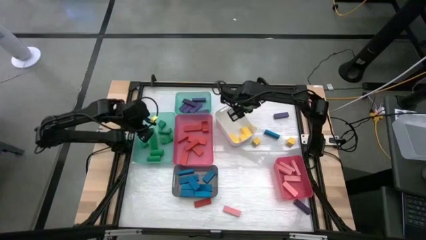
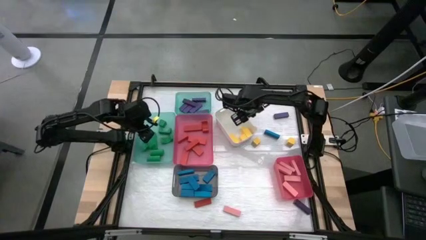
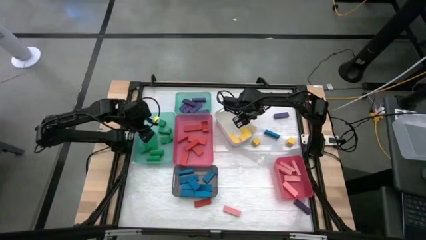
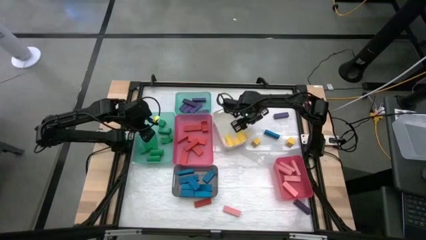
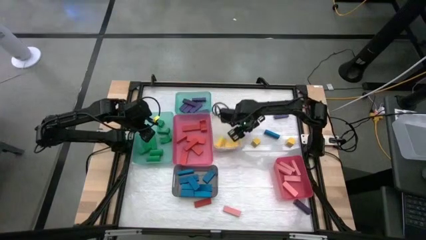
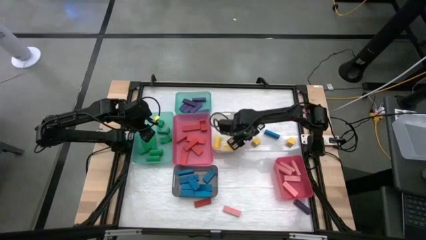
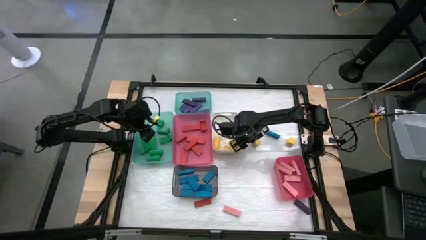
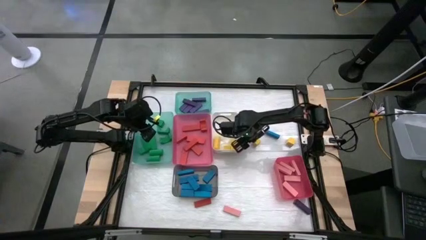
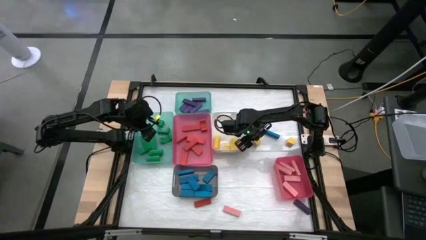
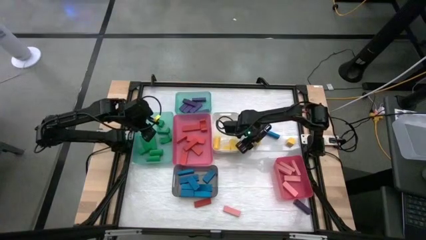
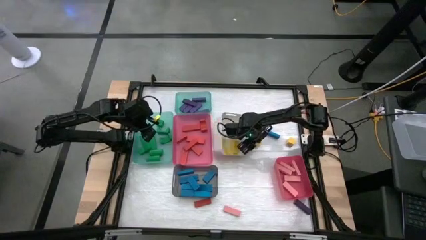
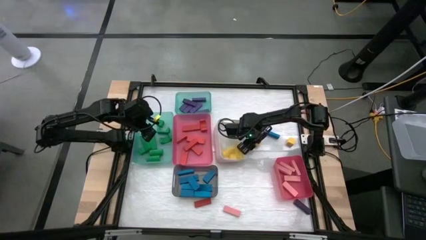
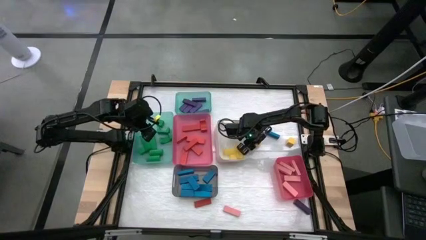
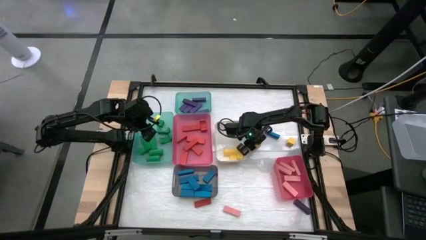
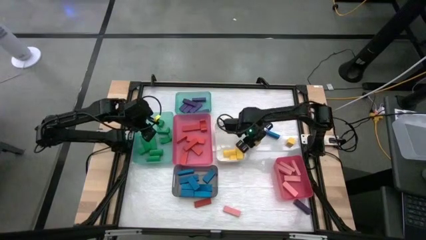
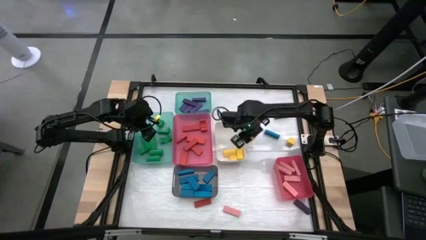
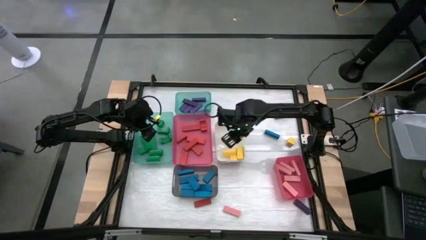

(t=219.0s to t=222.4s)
Task: Sort blocks
Put the yellow block into the white bin

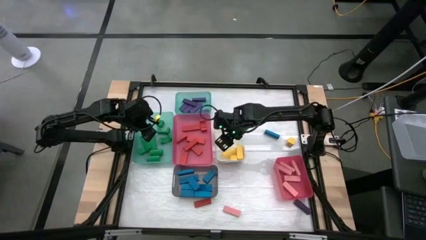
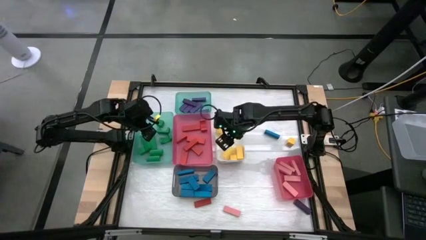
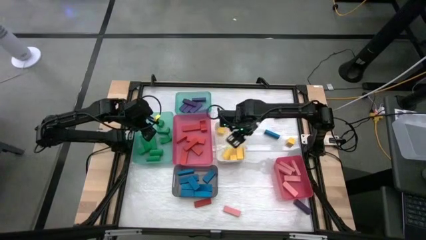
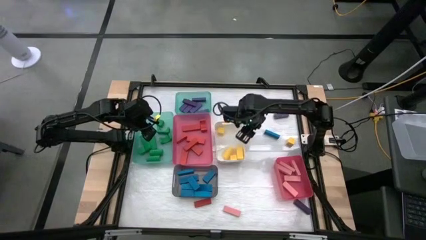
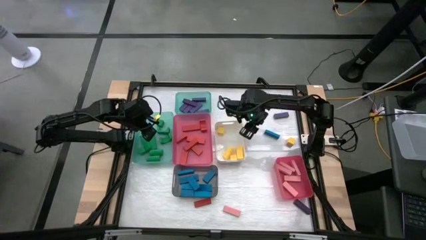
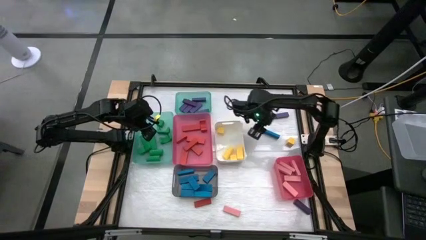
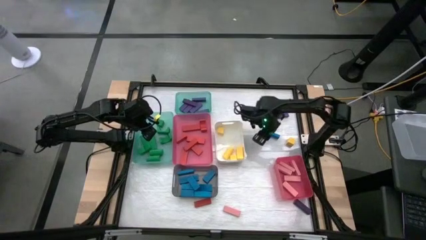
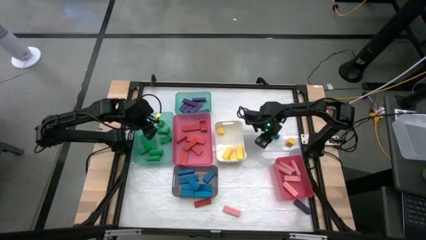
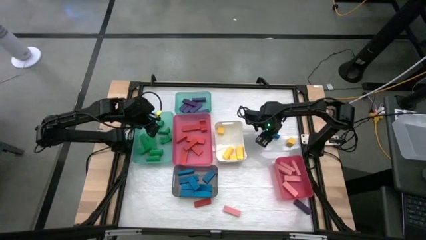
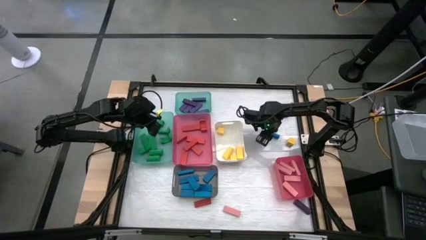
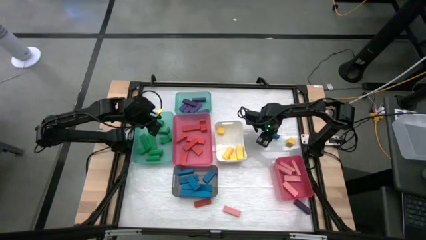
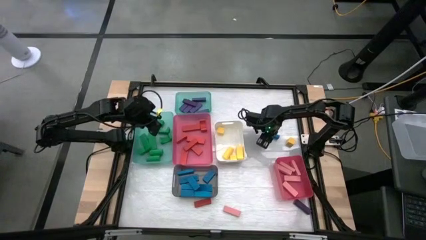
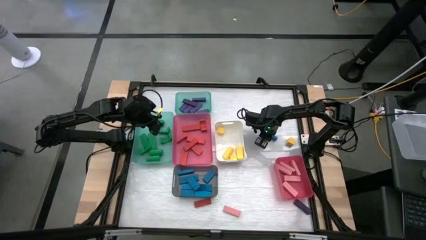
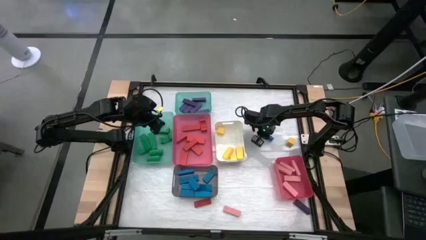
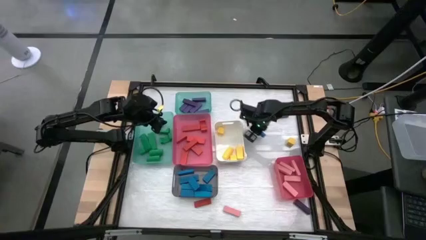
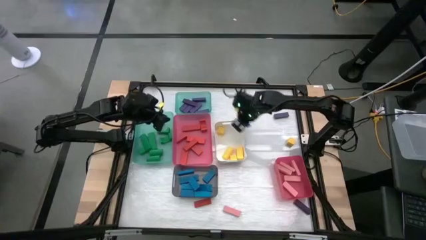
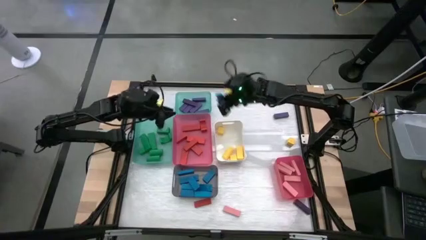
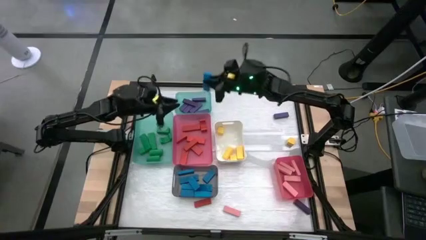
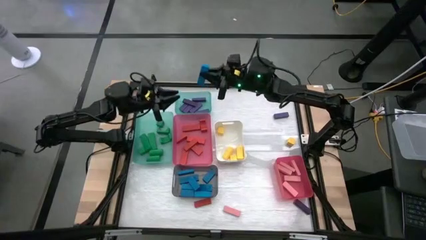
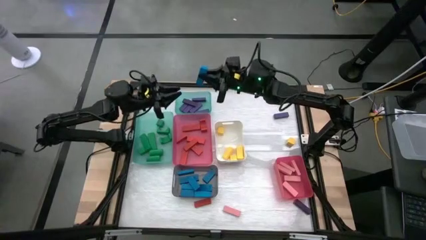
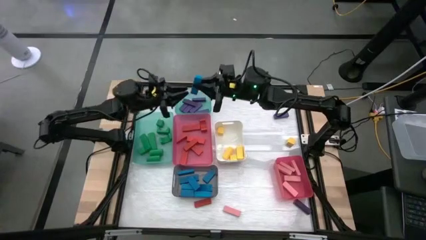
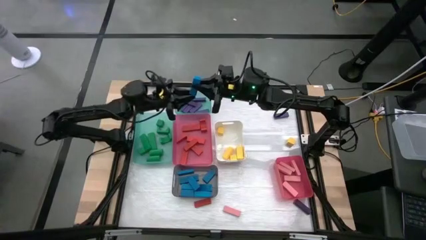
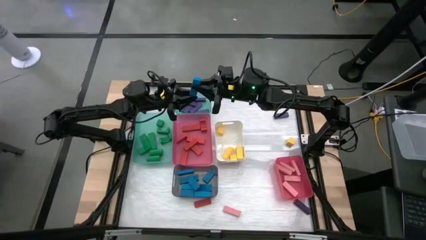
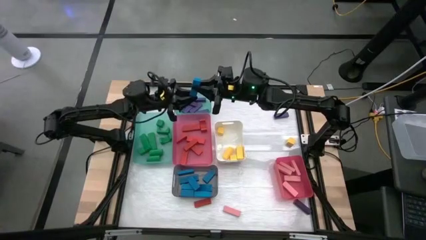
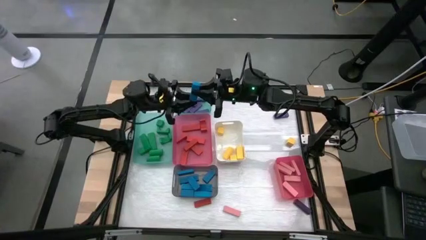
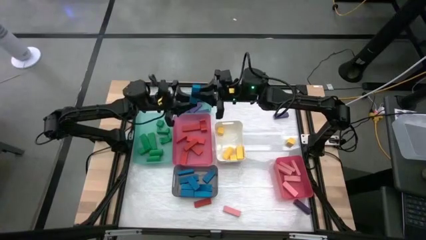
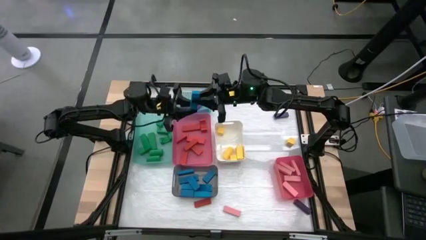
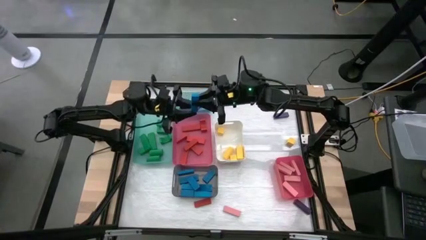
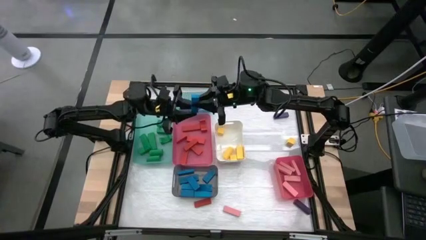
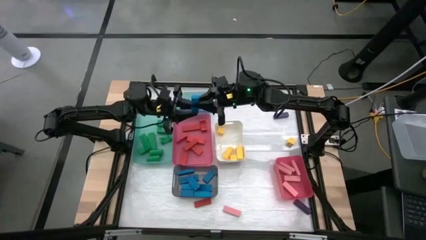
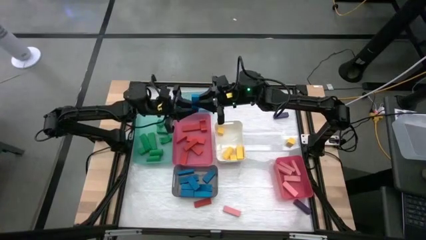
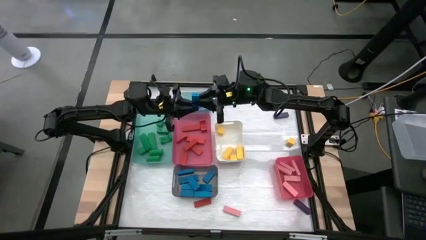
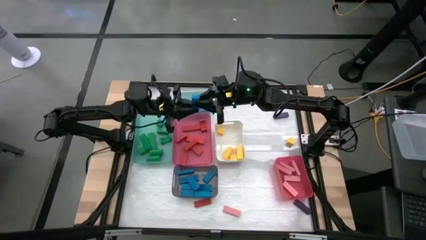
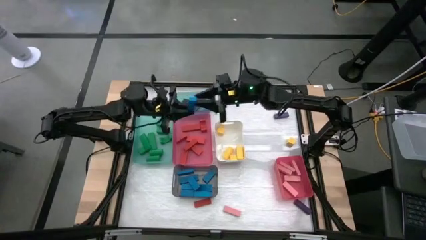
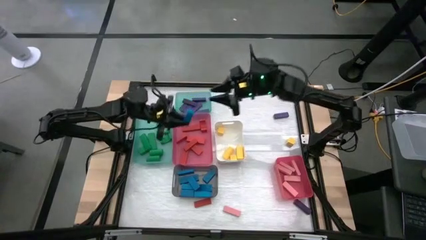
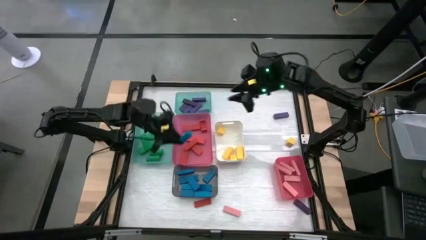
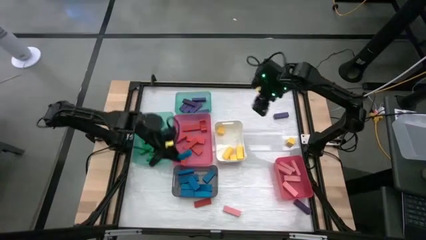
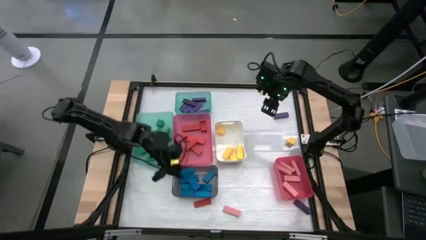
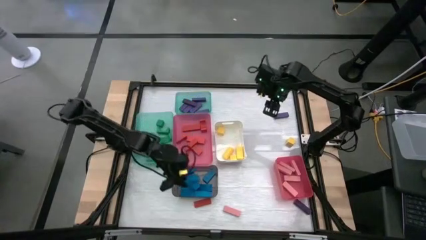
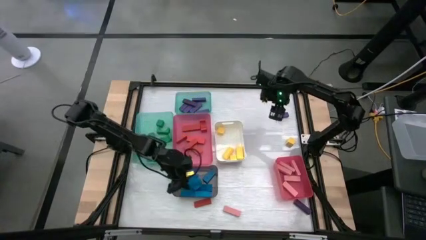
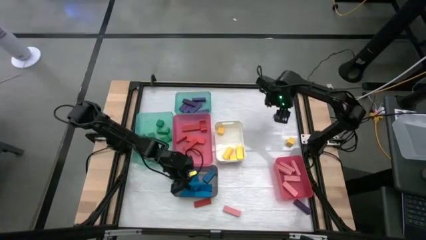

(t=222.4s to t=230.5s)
Put the blue block into the black bin

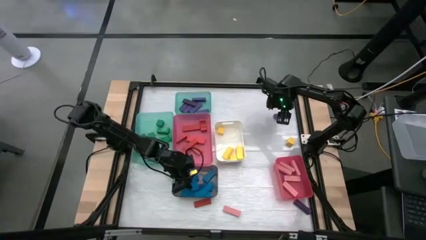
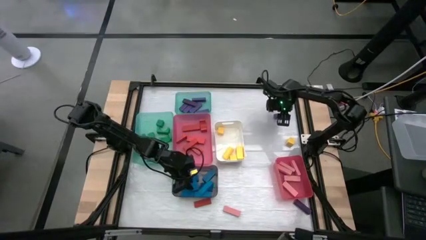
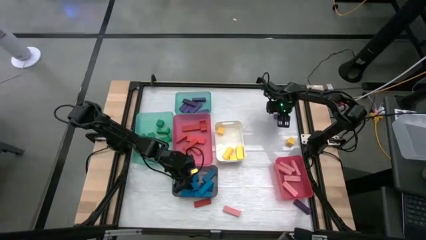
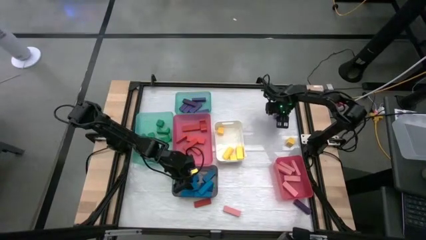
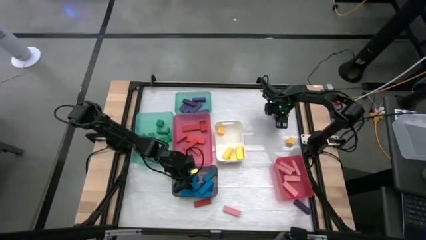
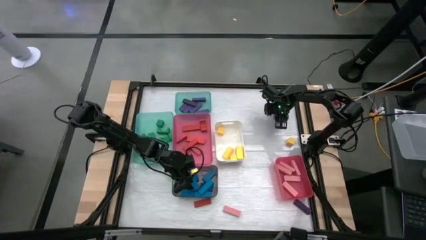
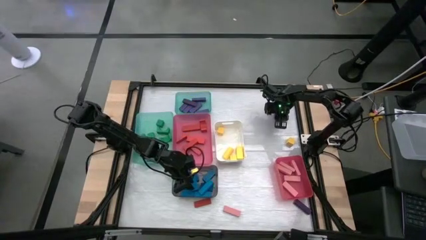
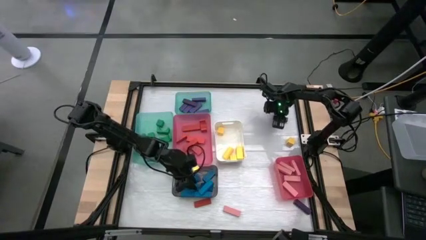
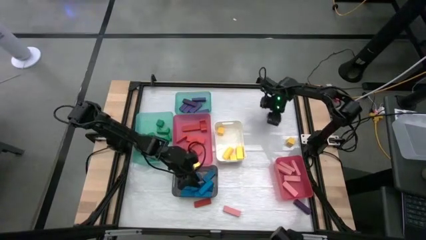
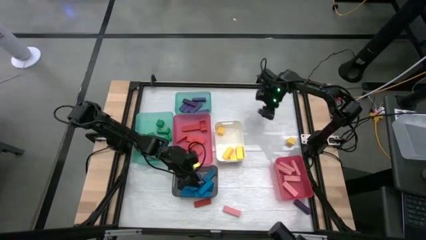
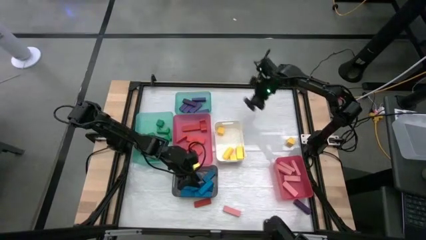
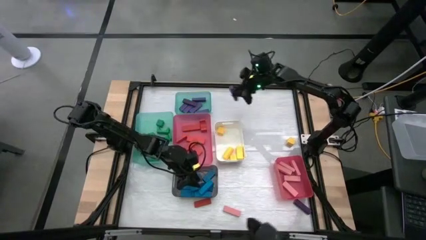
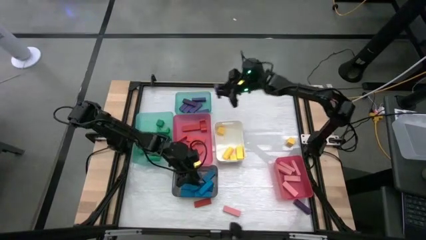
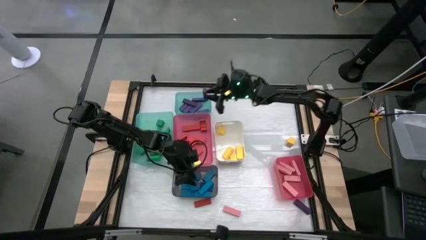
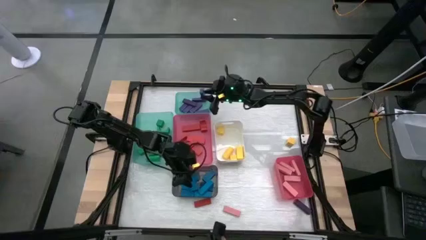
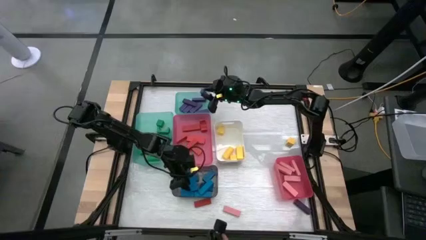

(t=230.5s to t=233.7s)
Put the violet block into the top green bin
